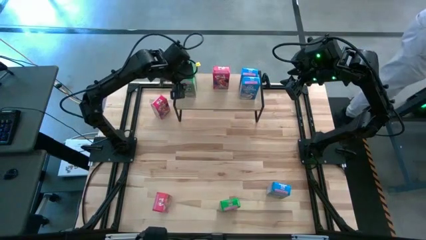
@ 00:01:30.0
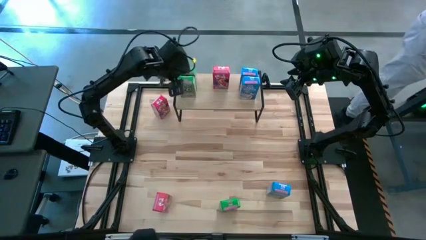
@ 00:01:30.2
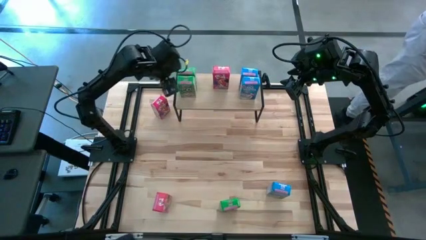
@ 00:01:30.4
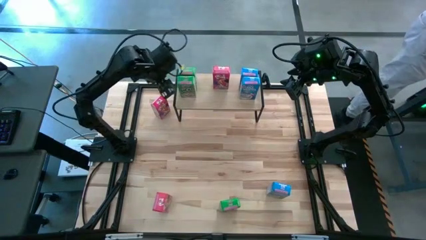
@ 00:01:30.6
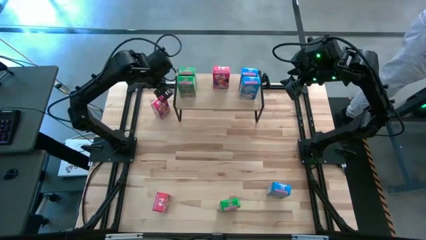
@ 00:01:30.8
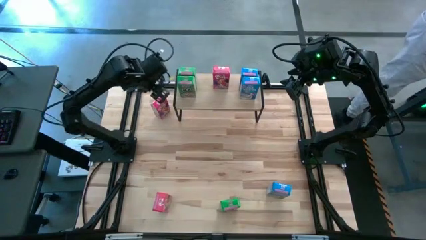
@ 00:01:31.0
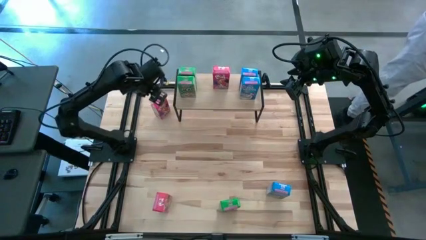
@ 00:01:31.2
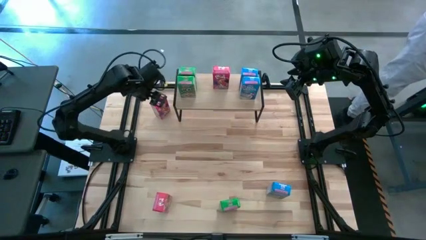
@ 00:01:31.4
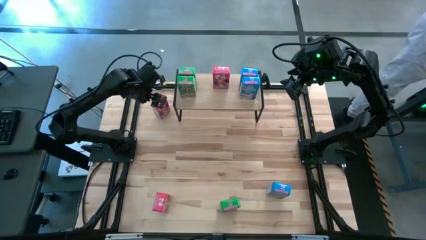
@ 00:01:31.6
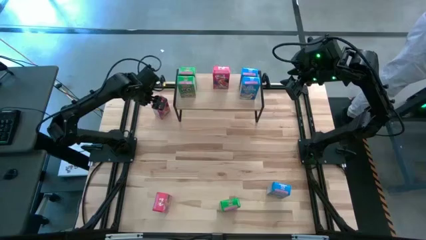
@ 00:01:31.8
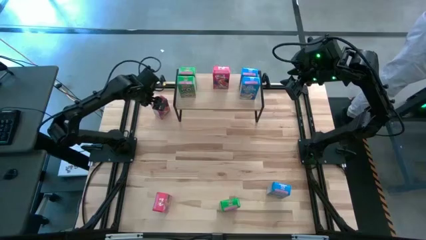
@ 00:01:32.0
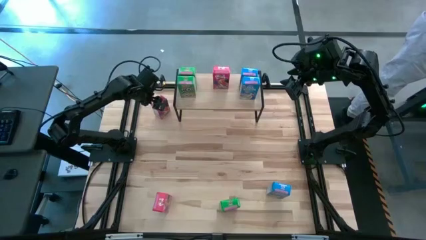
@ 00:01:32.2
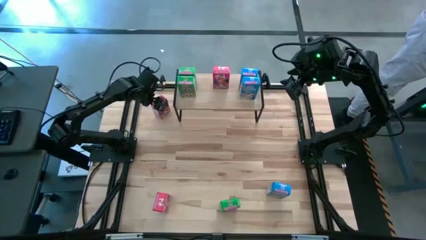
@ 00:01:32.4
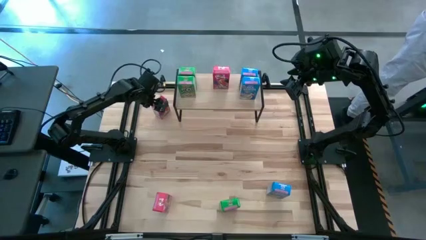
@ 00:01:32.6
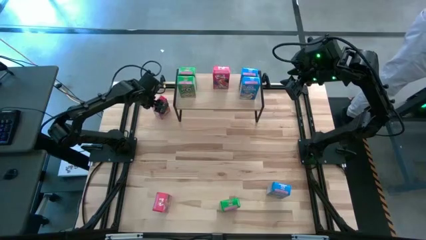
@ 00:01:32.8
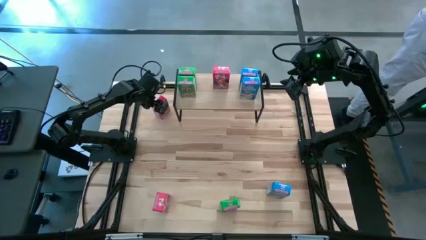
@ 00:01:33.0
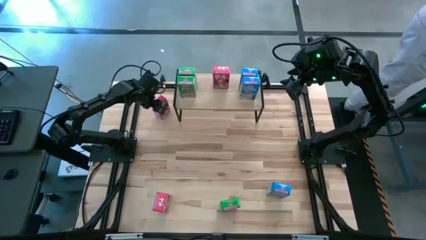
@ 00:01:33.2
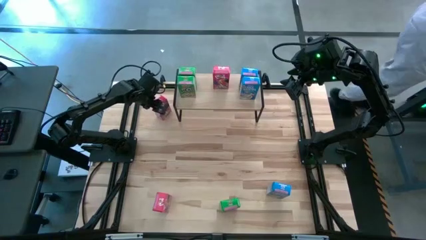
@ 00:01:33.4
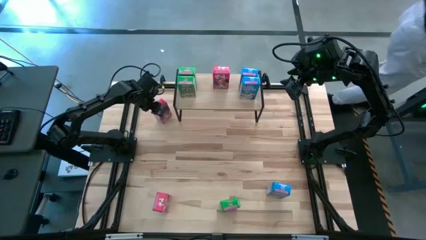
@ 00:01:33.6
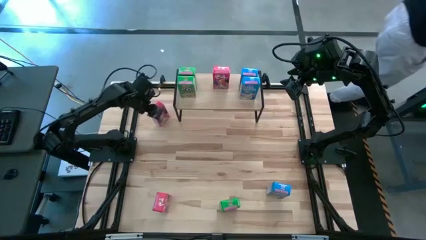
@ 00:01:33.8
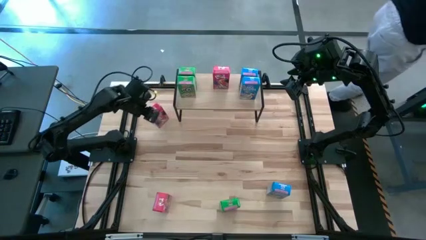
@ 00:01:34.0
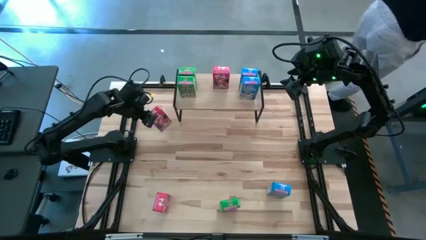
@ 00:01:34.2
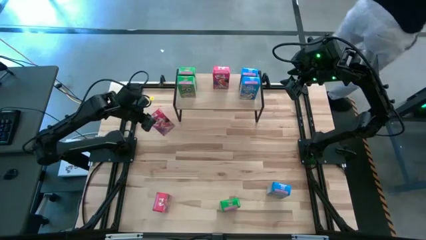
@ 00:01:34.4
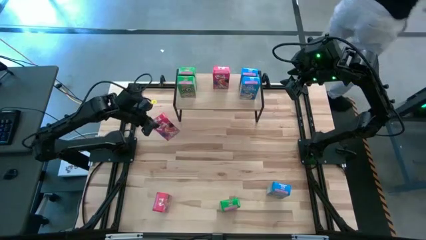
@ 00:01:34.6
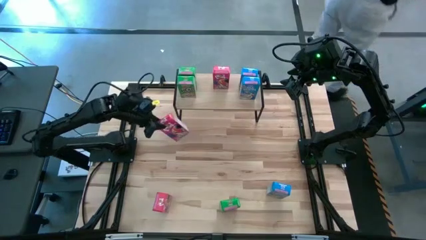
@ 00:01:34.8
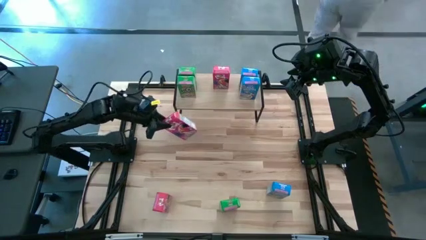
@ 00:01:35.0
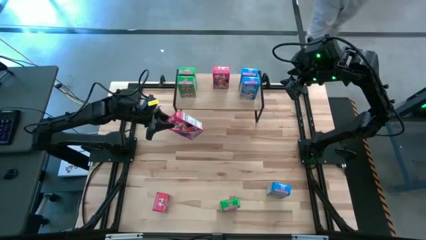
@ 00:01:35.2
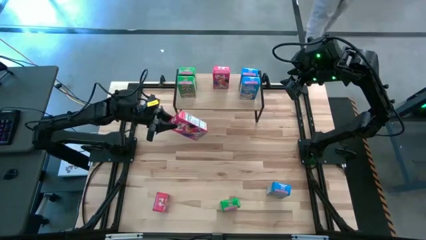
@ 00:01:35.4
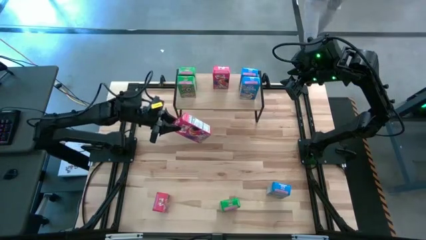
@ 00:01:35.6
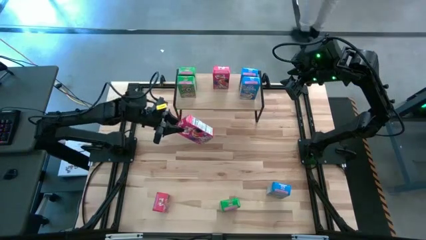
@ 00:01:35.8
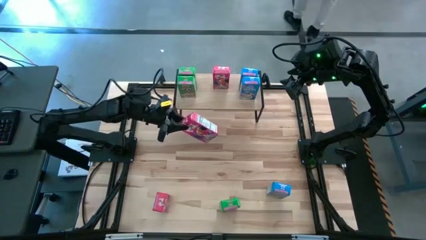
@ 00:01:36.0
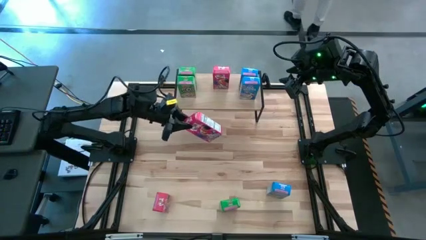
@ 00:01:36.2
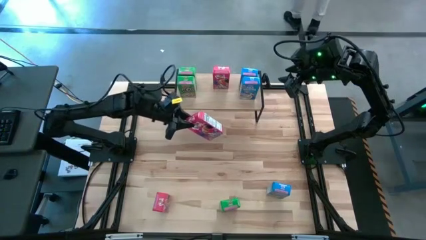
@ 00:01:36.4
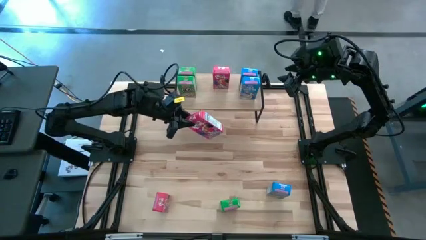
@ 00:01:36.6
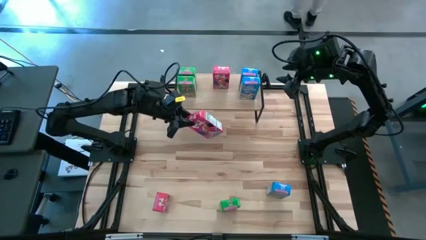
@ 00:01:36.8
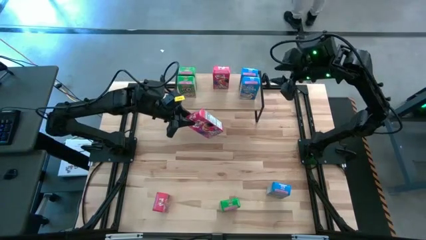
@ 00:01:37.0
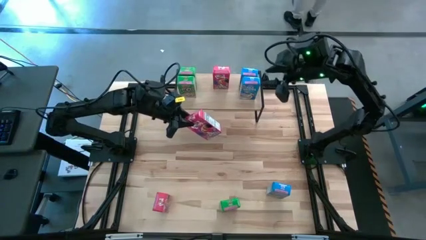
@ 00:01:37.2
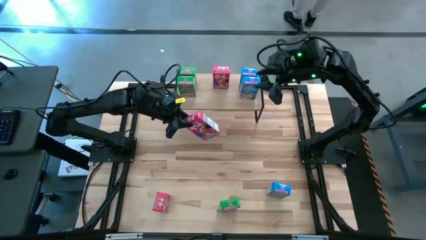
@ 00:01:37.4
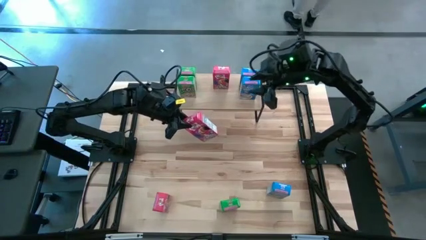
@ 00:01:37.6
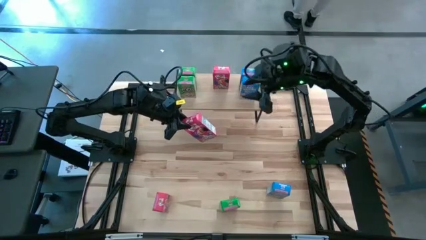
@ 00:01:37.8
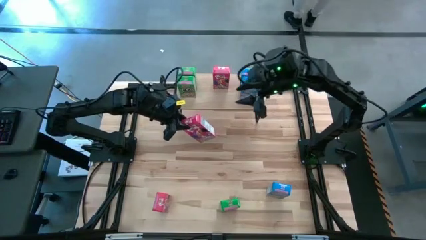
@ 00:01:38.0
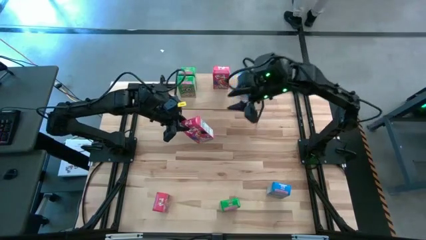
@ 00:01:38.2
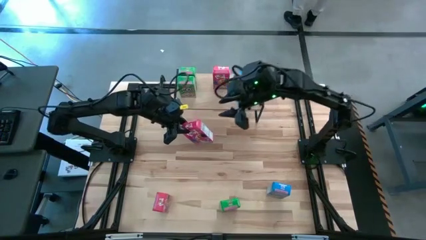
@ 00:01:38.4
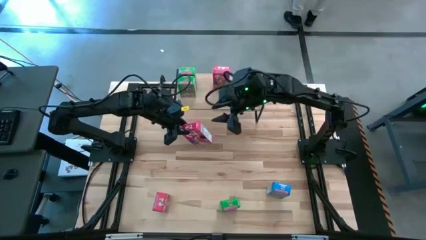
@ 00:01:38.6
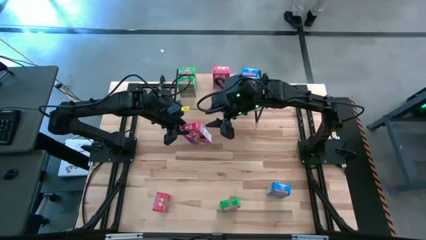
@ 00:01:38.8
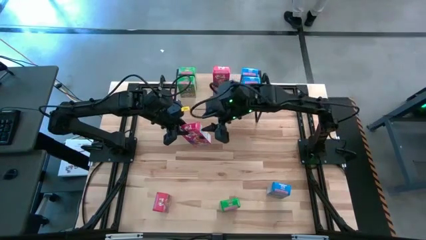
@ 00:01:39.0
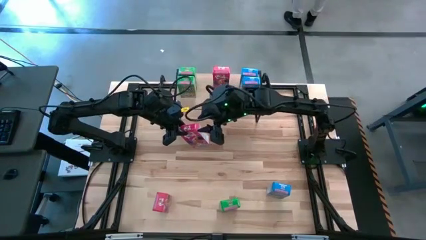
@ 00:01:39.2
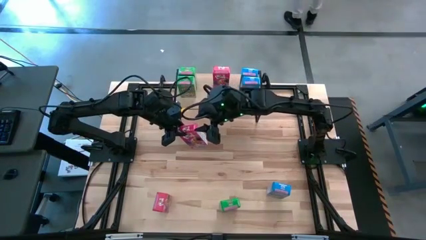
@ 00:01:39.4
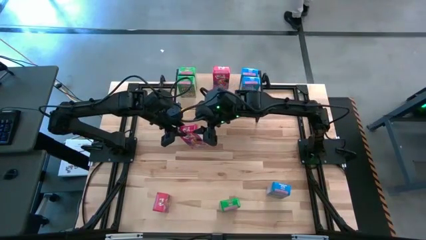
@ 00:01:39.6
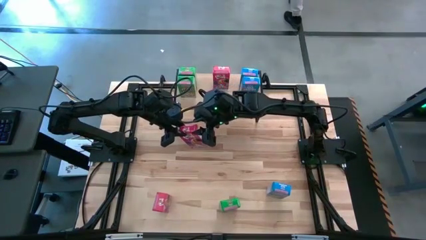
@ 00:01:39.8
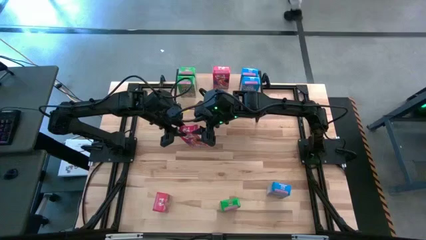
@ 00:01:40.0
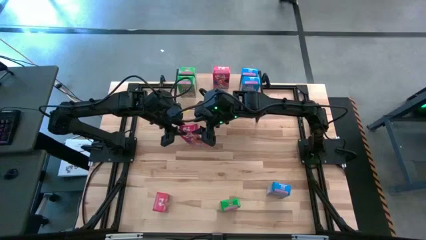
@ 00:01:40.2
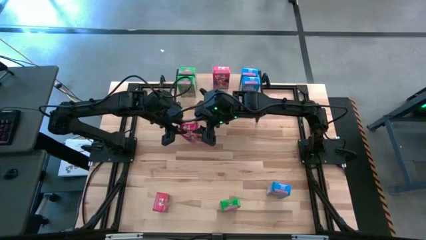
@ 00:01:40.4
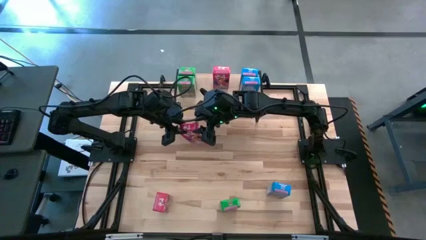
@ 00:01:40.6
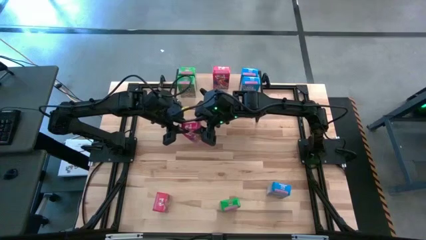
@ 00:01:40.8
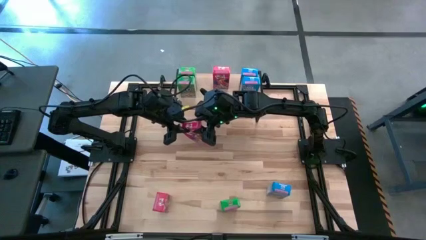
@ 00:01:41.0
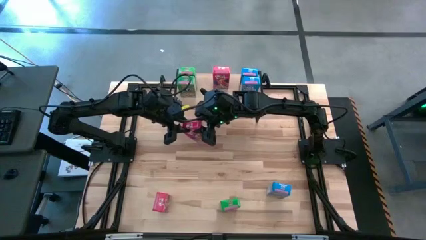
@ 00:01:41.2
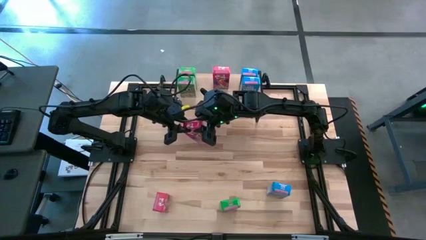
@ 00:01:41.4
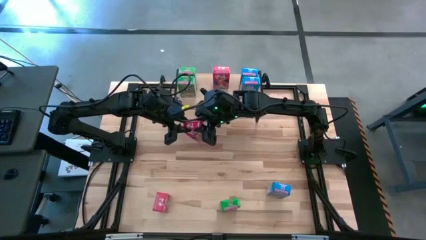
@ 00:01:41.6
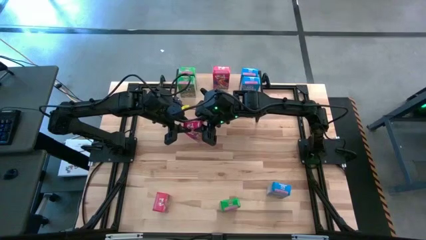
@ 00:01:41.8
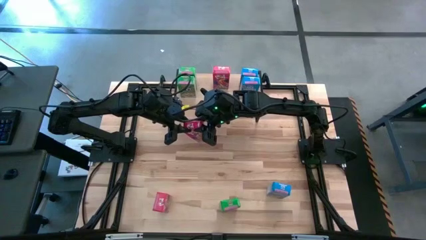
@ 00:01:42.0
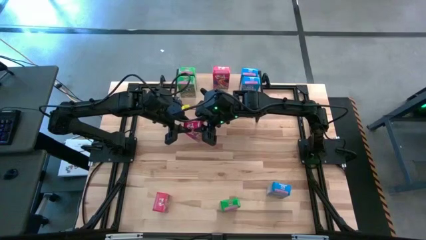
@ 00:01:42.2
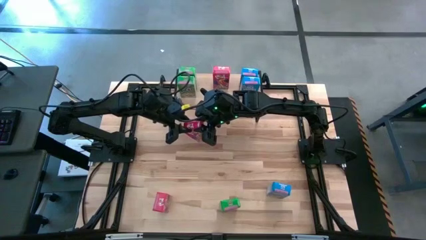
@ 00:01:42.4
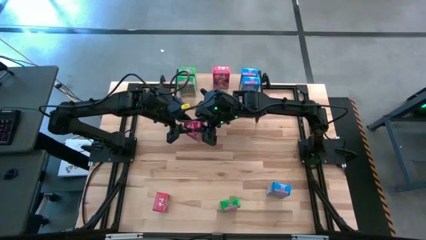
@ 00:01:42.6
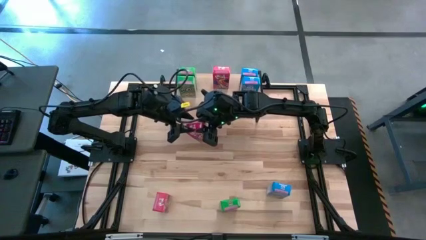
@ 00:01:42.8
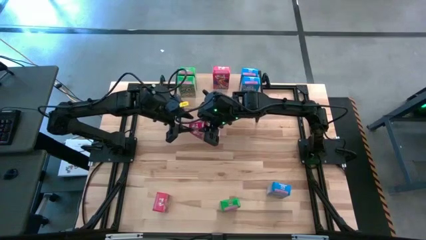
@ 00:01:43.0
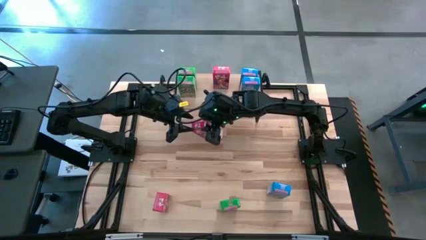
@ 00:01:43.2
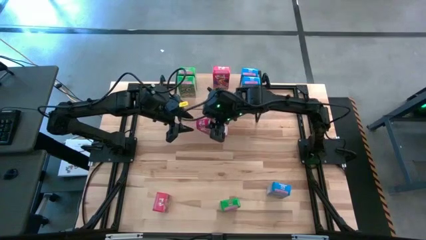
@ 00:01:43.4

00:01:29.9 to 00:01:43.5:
Task: Stack cereal on shelf
Put the top red cereal box on the shelf aligned with the other red cereal box
